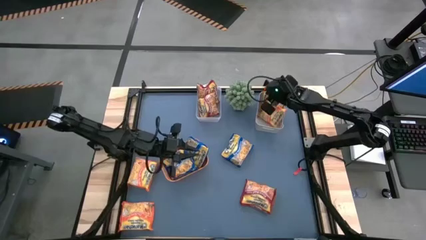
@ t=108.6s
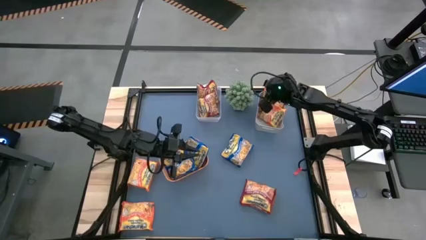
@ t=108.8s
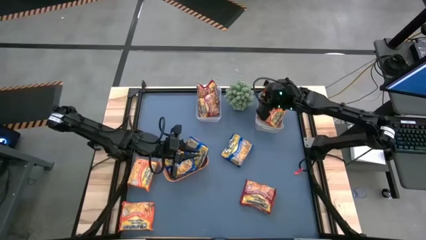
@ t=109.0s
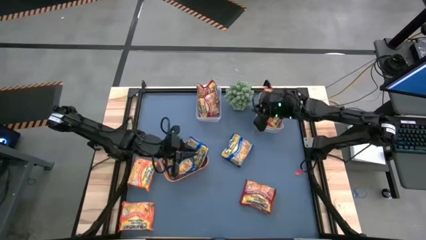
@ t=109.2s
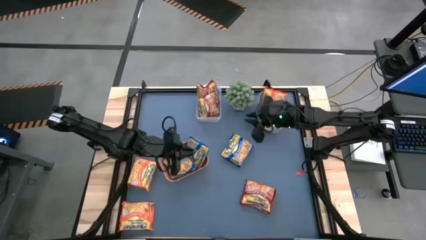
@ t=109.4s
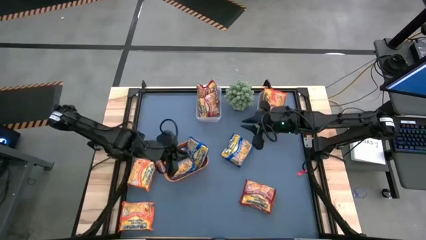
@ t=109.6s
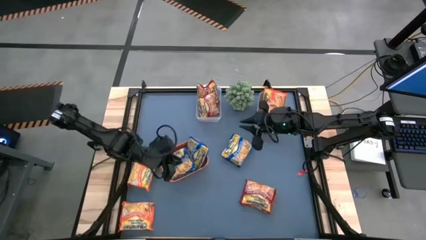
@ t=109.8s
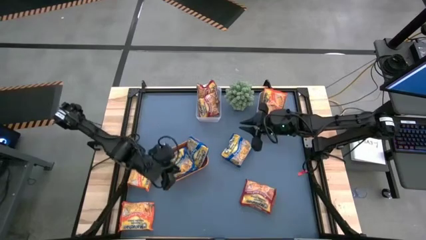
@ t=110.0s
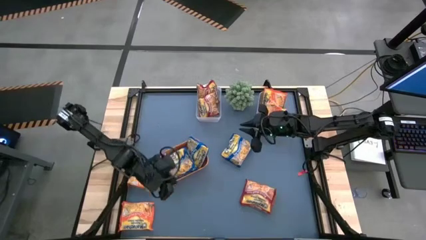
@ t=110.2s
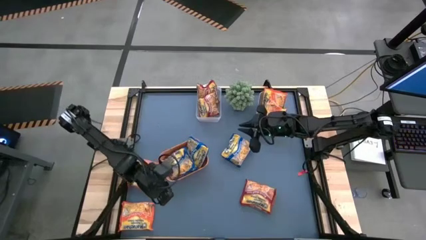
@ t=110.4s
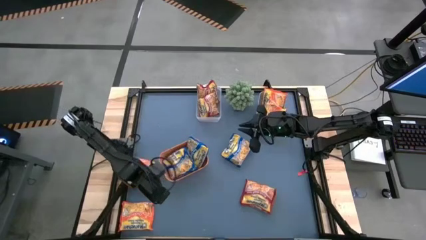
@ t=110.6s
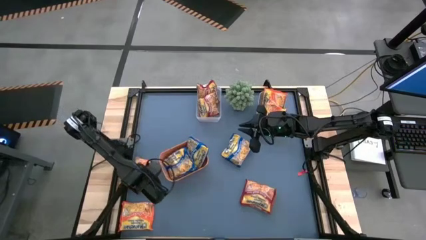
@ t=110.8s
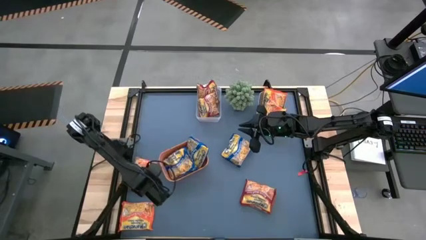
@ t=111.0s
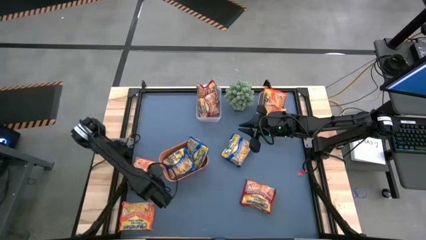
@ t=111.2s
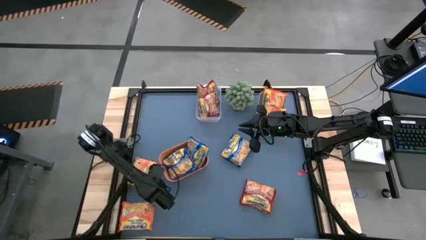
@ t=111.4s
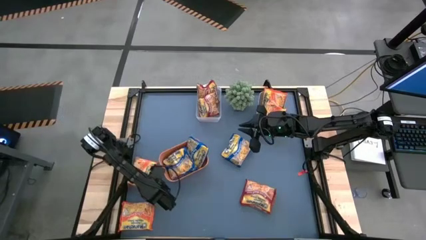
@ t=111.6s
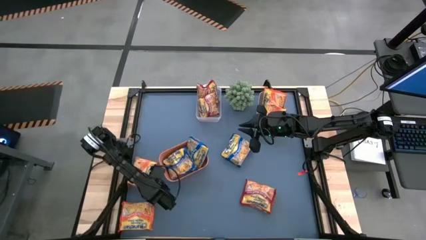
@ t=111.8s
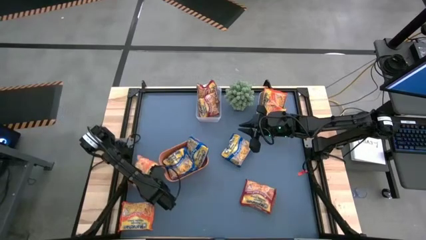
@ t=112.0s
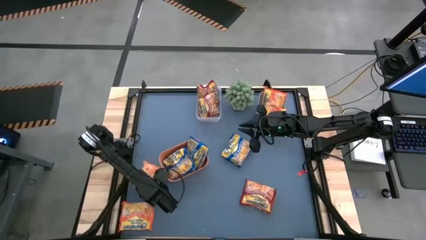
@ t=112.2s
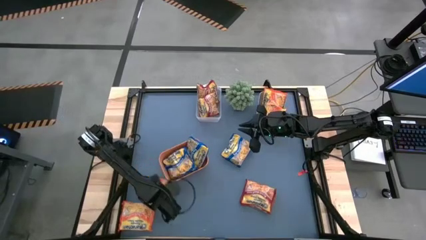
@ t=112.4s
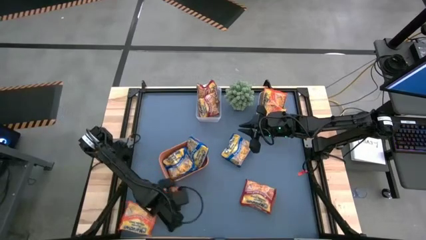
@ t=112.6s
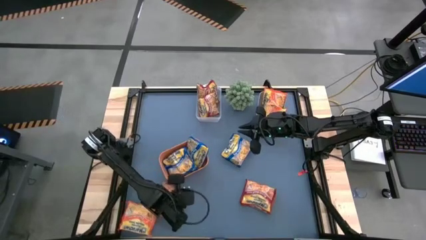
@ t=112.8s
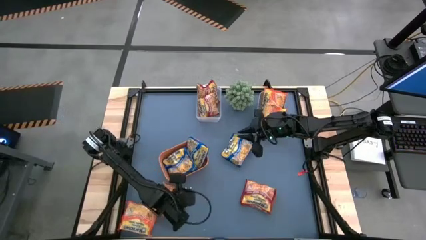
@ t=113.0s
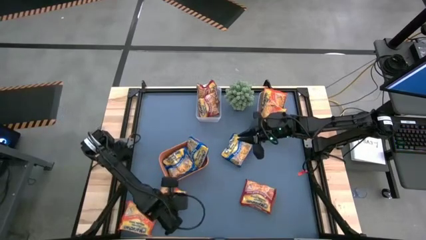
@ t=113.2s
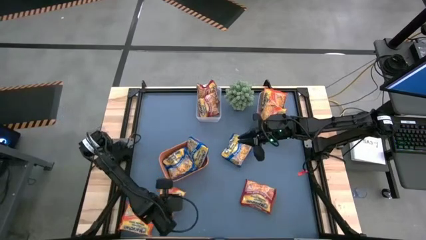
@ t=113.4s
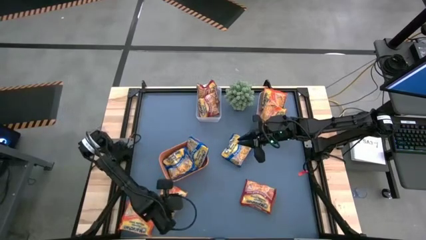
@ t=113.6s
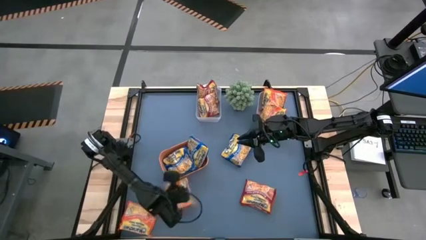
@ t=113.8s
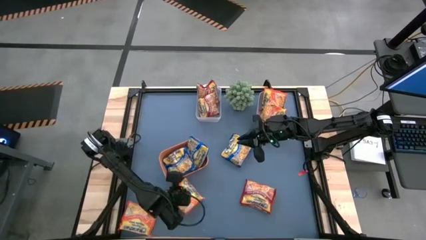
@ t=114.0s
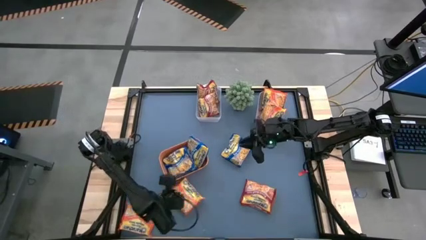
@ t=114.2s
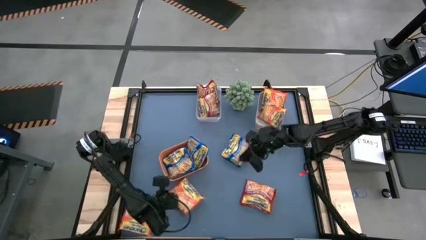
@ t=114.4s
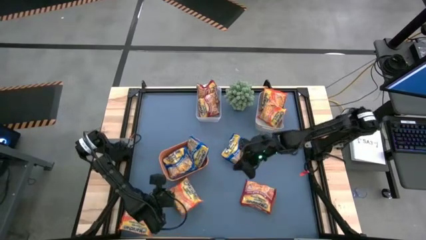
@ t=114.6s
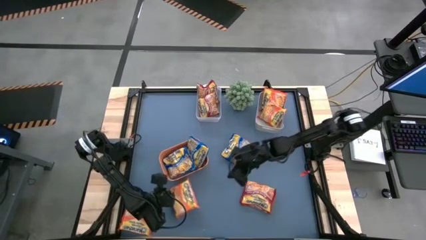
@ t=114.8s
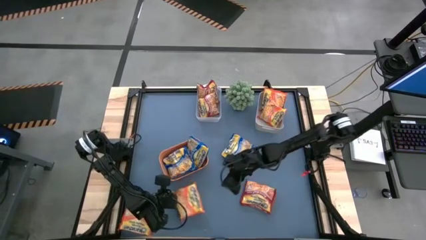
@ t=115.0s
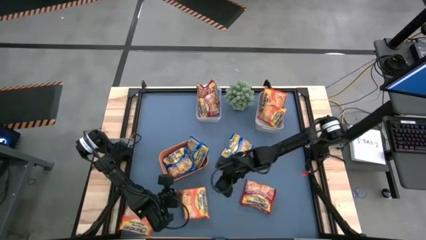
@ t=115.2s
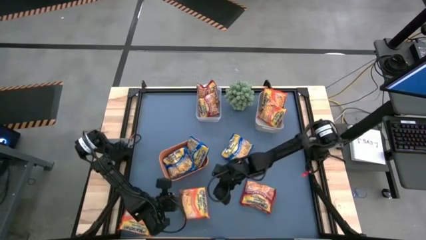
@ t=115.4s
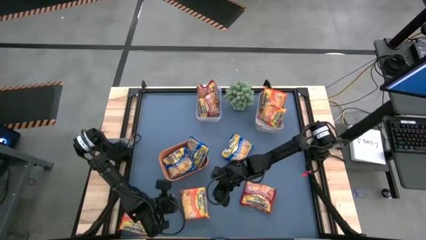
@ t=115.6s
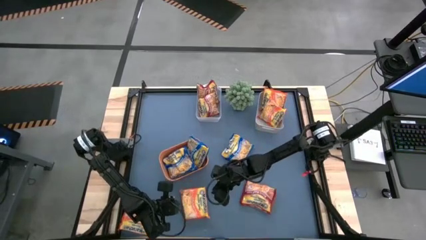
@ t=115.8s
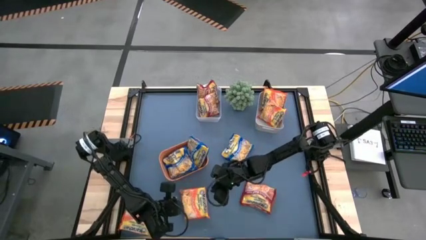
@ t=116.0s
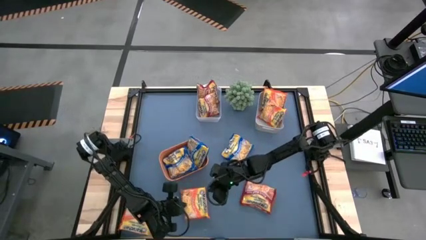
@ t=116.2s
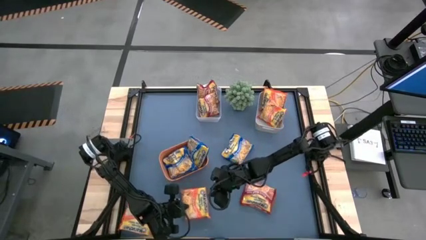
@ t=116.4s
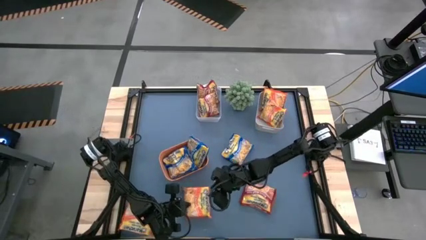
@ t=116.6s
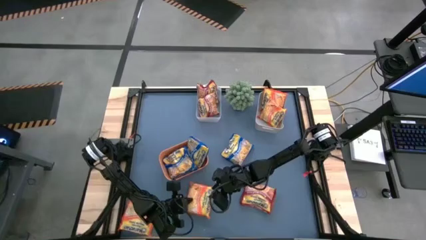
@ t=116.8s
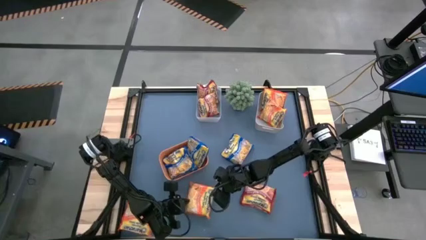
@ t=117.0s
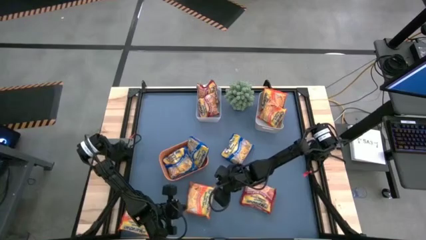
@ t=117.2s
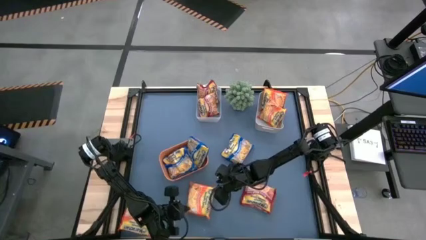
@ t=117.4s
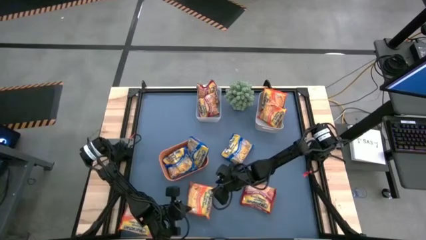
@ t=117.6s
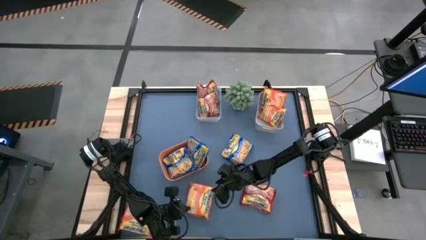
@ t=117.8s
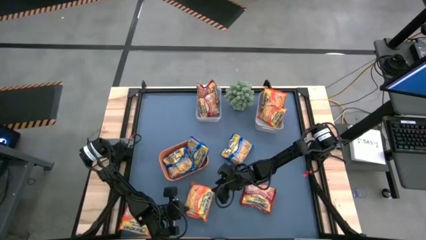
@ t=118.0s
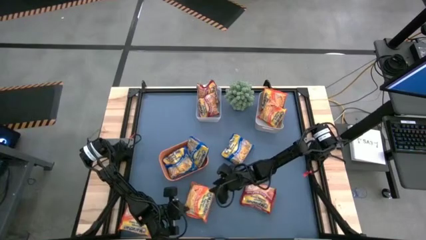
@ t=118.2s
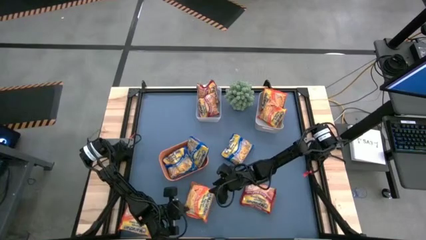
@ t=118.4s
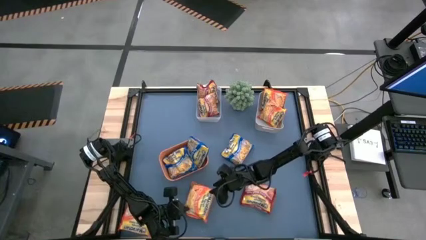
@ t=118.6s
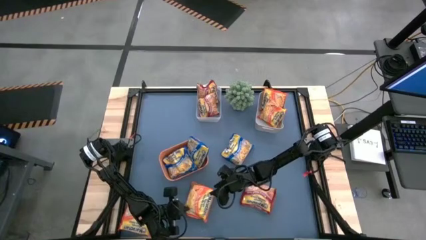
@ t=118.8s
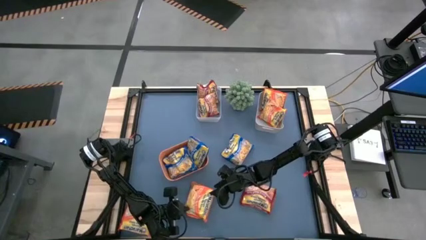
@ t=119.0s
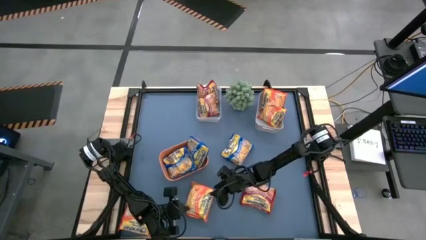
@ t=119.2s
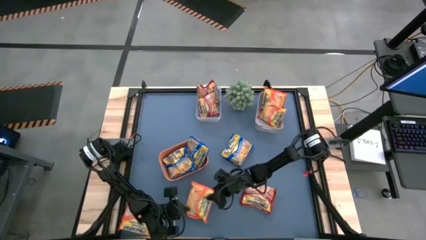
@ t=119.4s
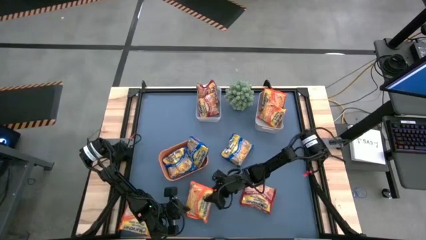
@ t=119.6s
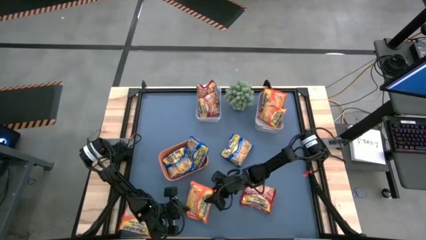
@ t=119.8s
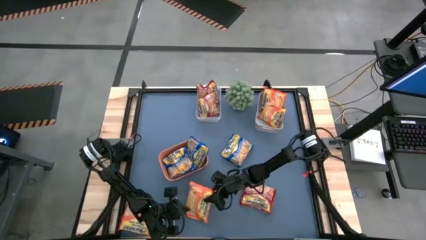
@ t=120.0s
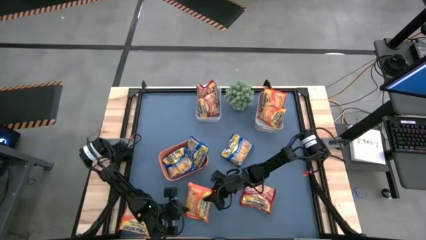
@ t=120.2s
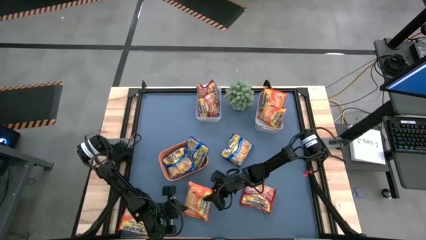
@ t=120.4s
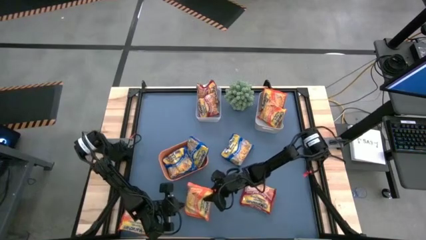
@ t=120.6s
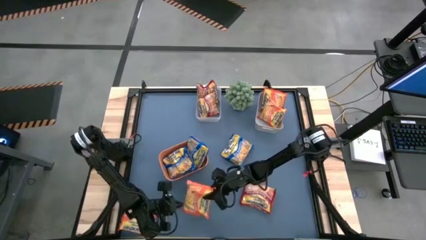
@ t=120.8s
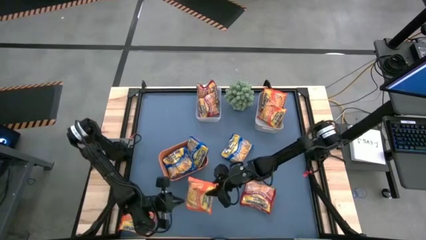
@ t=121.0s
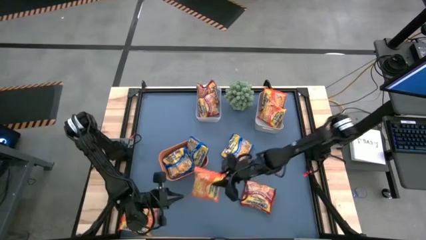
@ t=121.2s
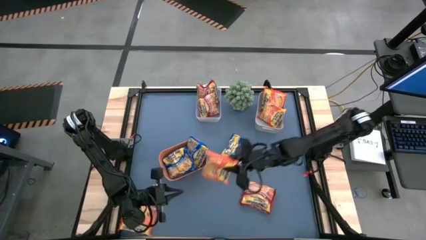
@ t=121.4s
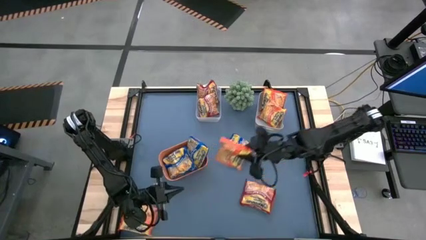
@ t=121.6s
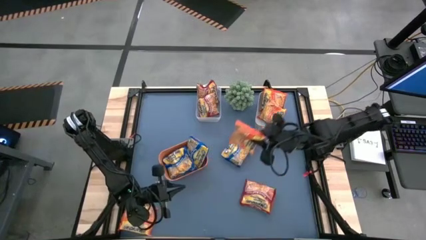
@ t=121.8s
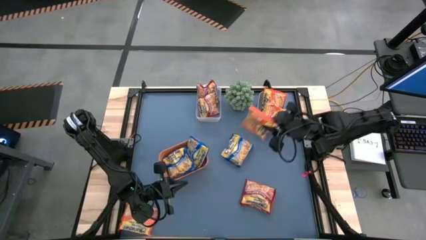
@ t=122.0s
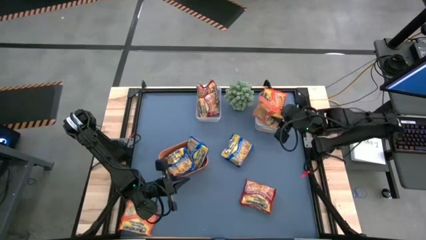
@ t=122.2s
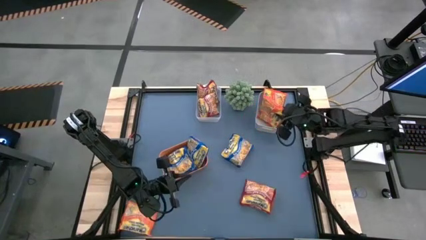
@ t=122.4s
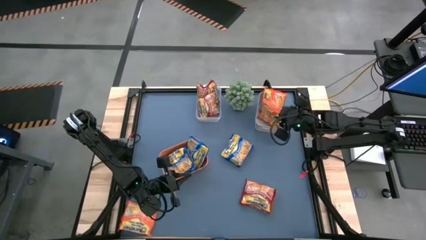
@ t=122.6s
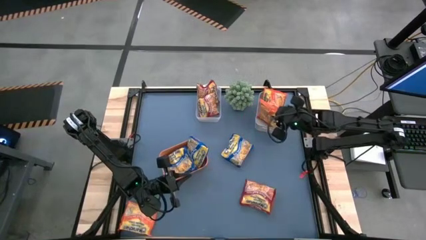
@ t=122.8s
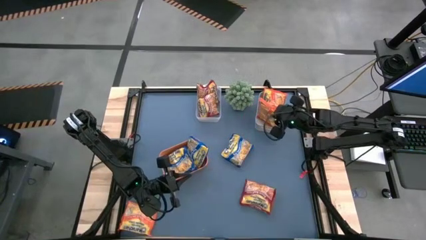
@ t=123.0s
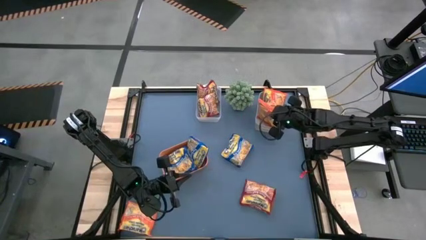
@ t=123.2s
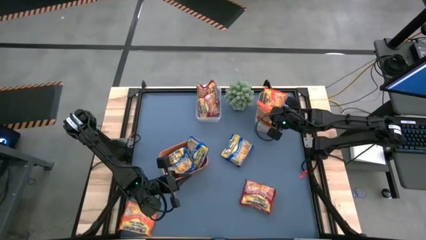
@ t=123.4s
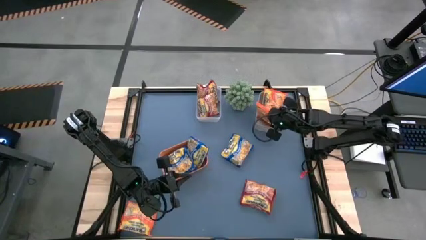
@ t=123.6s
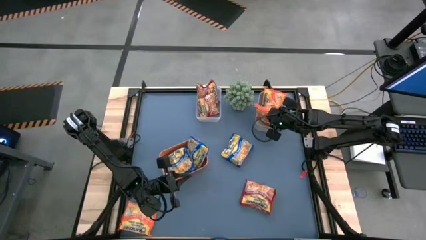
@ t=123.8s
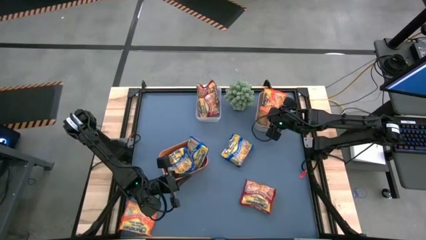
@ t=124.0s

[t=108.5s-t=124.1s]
Task: Sort Maruchan noodles
Put the orange noodle pack into the gray bin

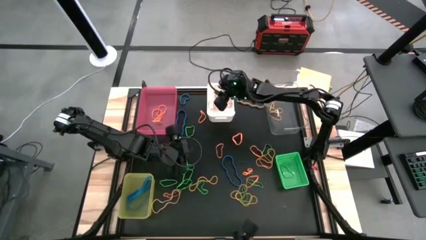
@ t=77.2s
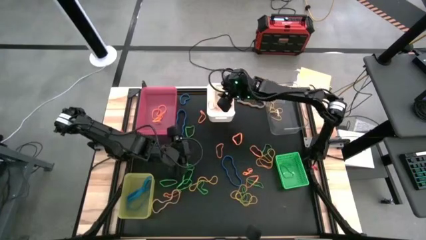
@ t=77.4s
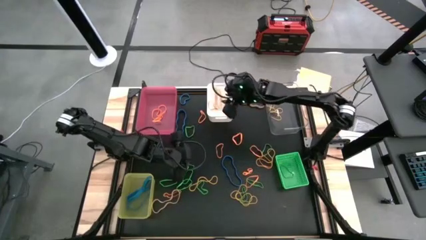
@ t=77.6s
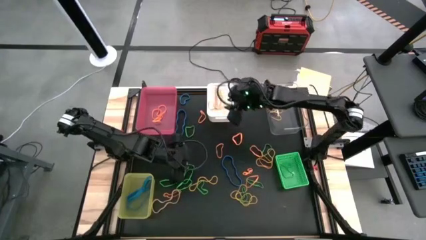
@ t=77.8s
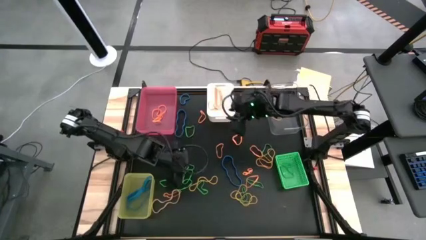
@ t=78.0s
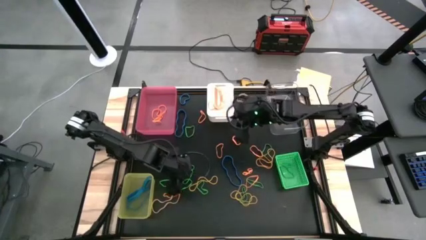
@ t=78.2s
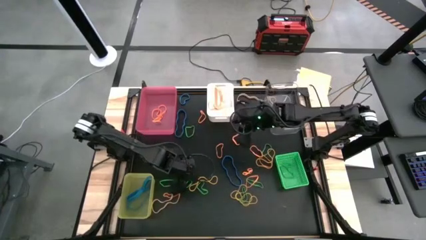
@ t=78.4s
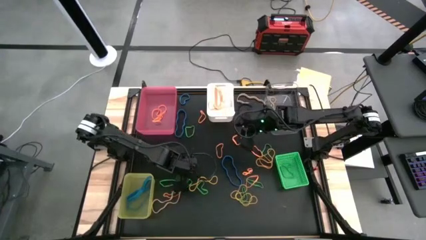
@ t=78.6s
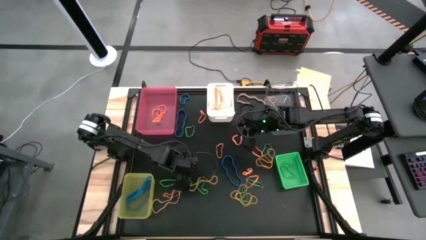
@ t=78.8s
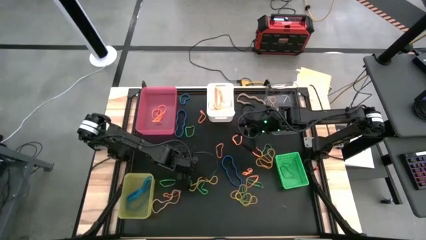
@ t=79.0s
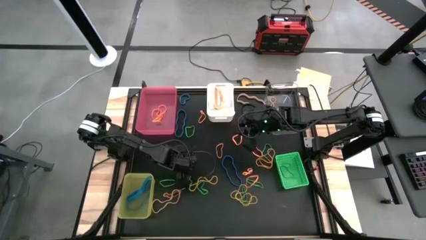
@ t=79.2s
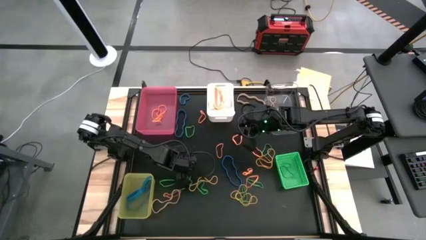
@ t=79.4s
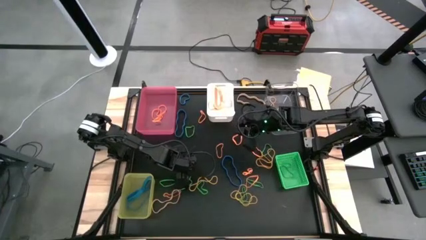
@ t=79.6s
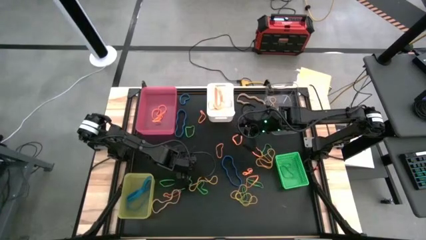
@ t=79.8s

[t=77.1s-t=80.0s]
Task: Sort rubber bands into baskets
Put the green rubber band into the green bin
